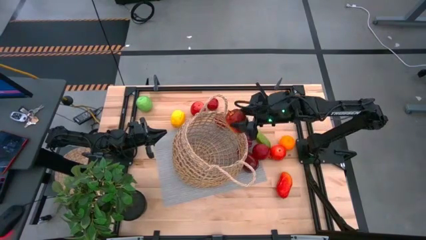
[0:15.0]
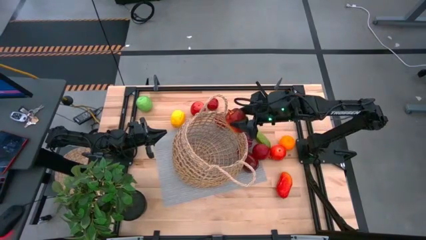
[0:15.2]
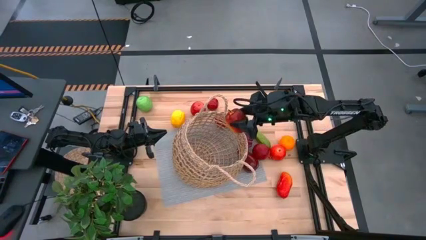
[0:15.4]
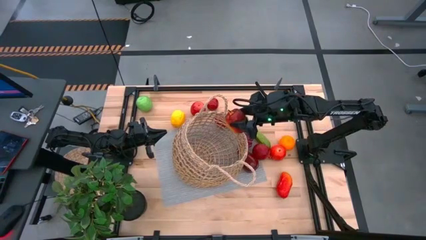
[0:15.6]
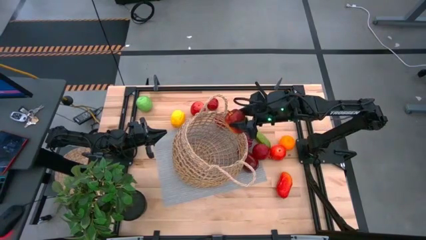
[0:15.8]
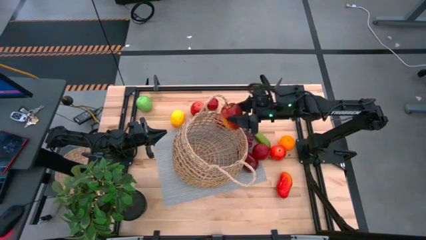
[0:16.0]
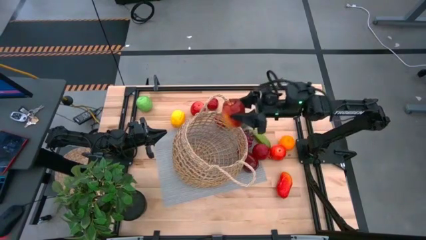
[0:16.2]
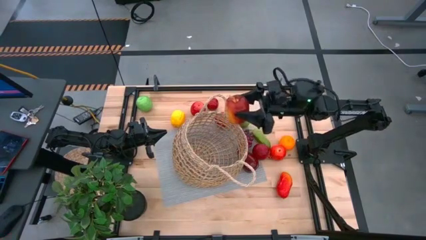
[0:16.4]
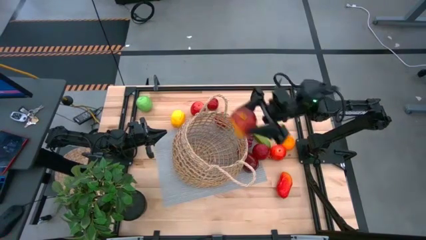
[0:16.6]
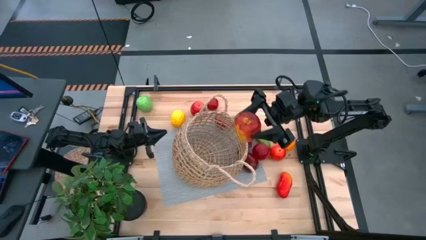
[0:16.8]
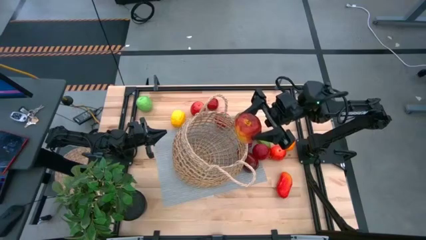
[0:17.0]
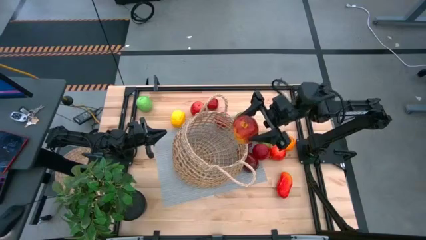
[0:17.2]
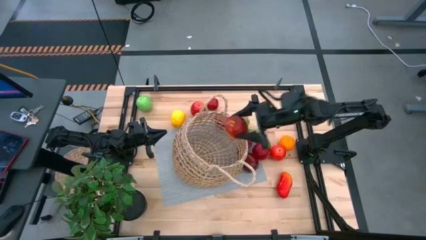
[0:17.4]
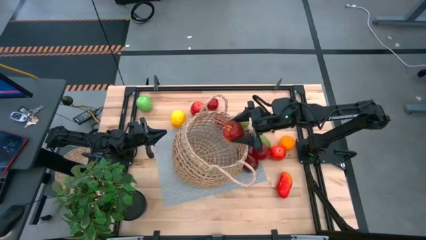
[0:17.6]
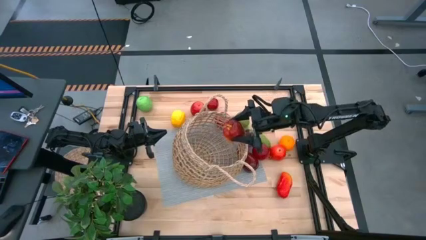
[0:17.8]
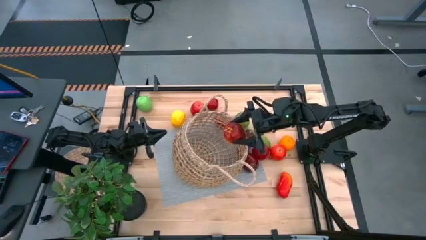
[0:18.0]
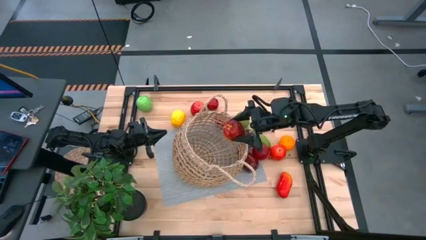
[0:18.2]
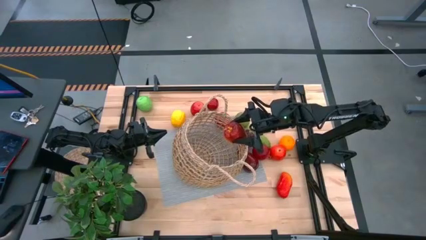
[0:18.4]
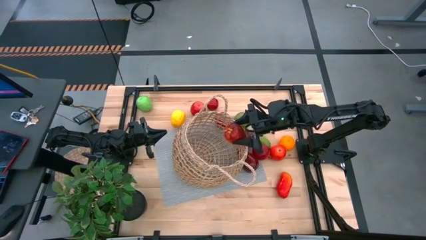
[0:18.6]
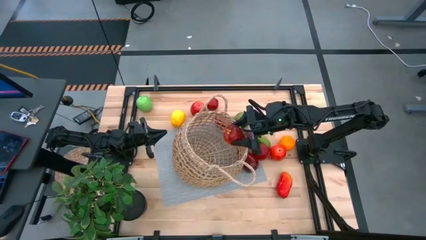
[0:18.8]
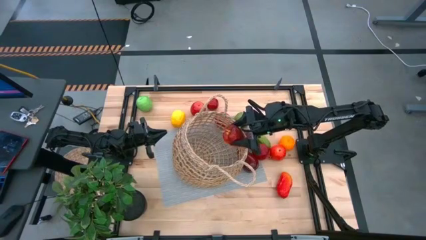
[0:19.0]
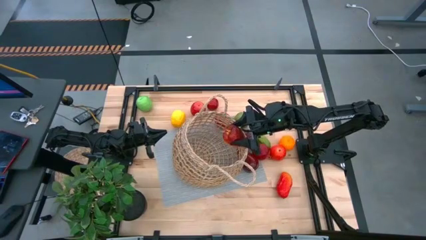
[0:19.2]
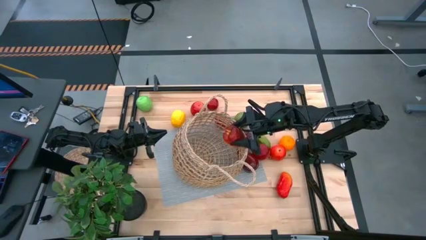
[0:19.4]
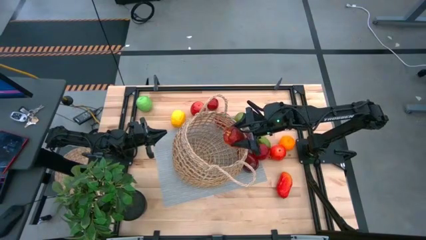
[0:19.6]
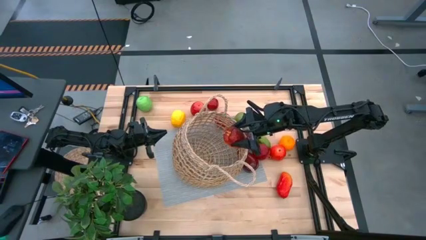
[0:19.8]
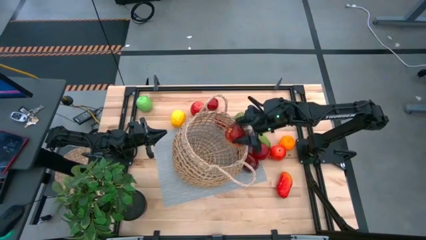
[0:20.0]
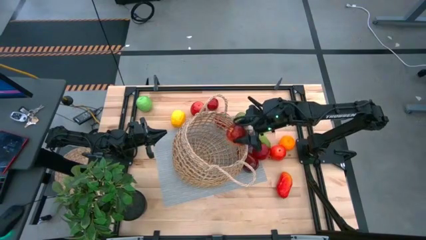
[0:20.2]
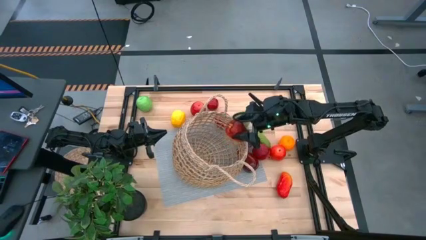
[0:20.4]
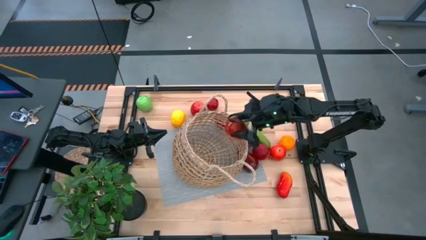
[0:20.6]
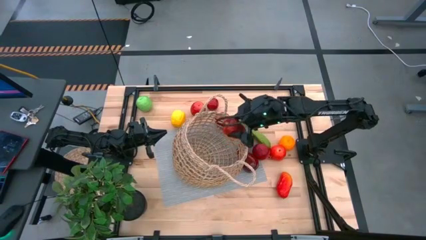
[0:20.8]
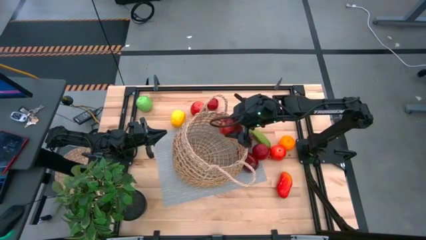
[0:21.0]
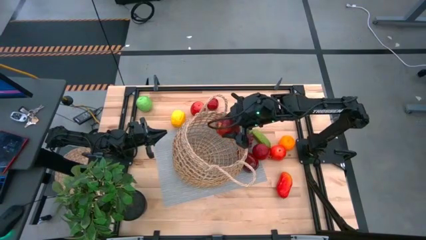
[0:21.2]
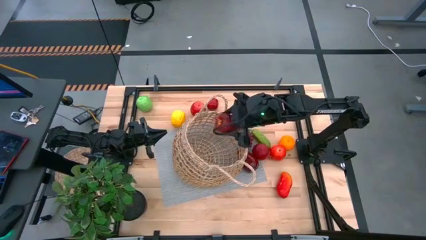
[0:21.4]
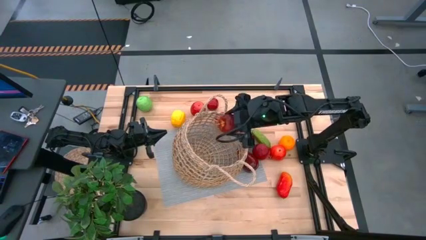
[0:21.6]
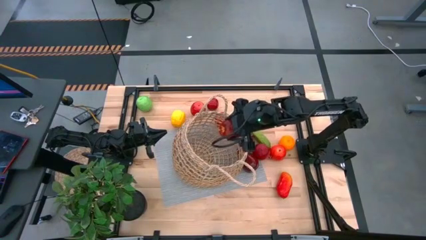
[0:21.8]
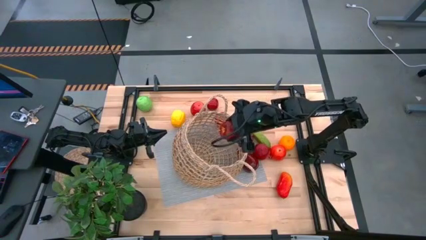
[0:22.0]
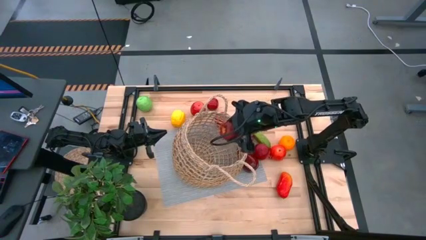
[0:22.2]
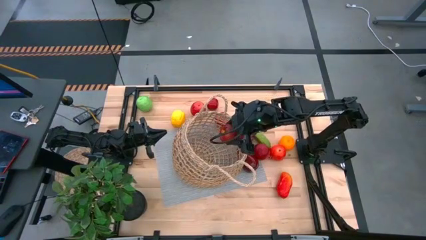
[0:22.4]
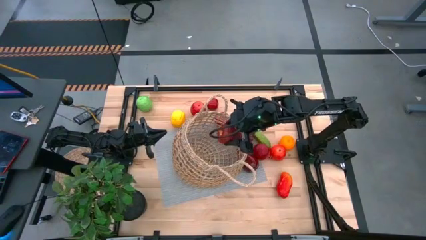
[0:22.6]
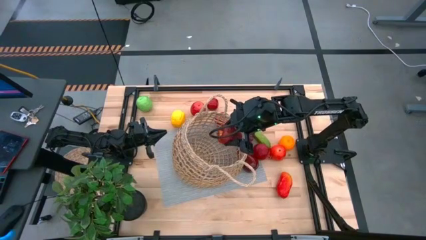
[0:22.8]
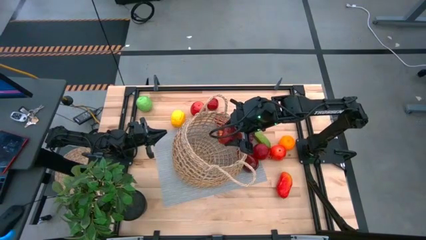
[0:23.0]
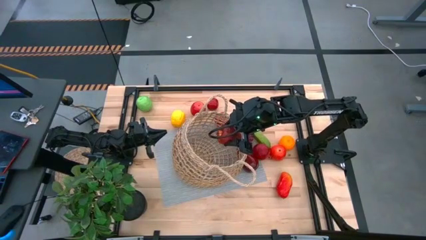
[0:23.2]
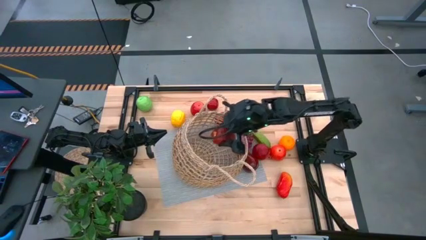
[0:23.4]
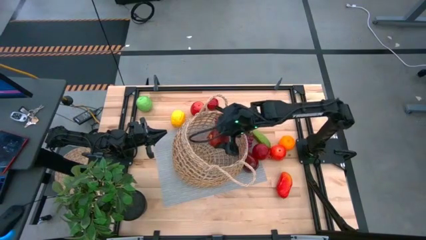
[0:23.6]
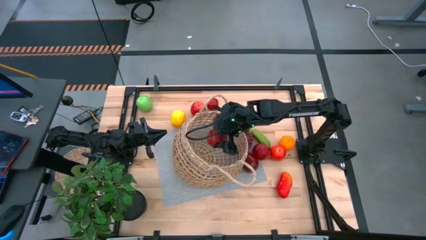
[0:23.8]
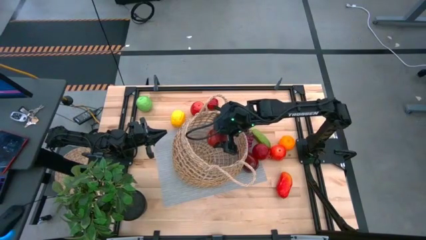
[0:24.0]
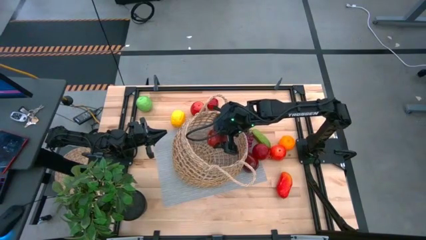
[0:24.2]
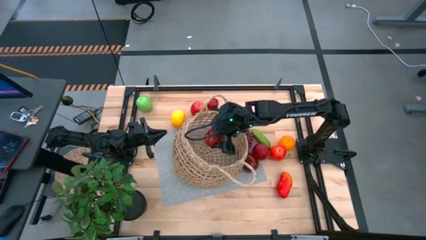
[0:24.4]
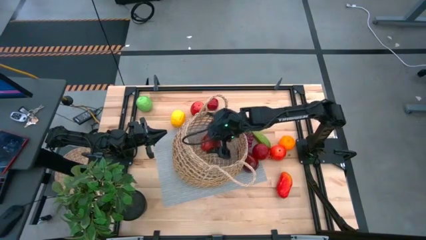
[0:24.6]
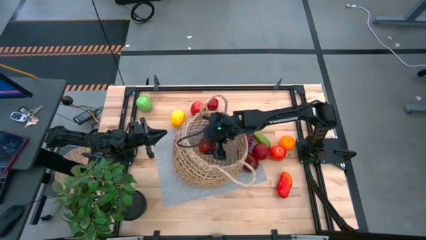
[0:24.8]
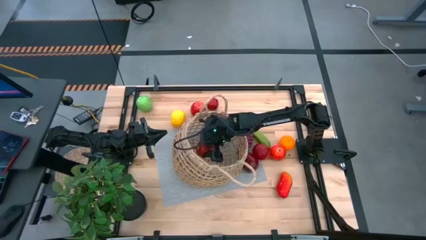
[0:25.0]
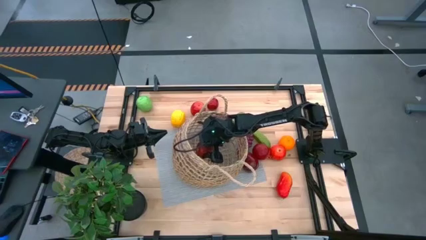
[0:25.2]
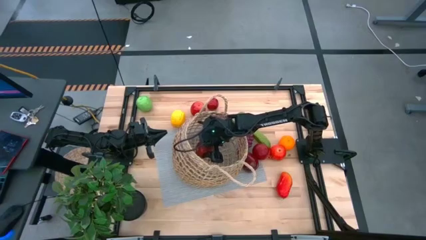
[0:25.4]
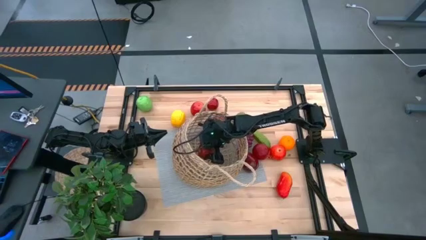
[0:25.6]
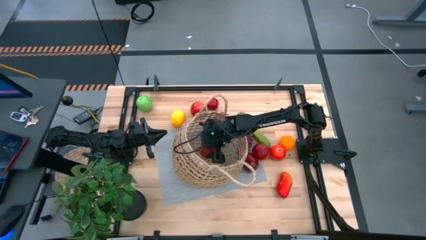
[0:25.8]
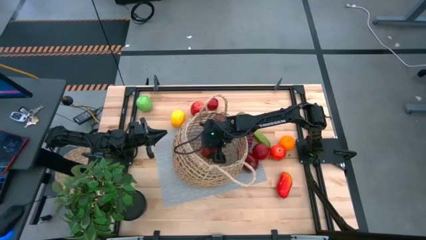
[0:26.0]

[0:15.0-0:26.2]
Task: Build produce basket
Put the red apple into the basket

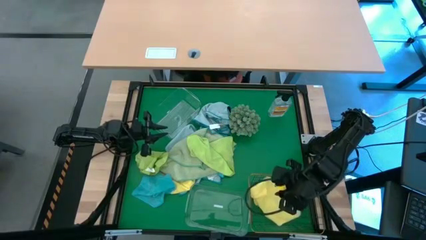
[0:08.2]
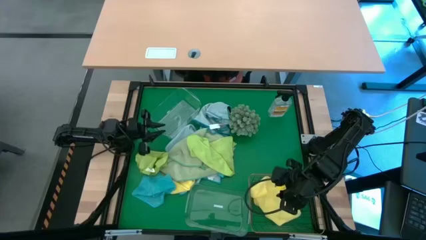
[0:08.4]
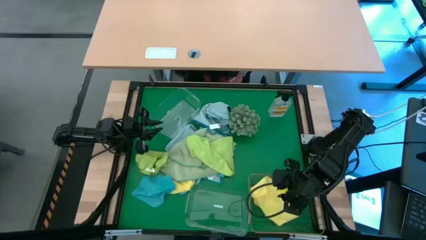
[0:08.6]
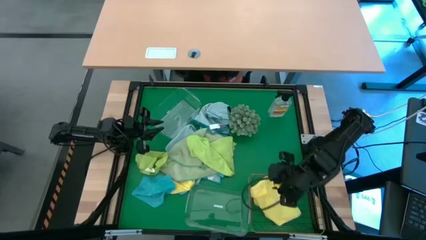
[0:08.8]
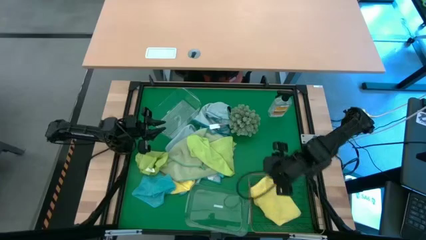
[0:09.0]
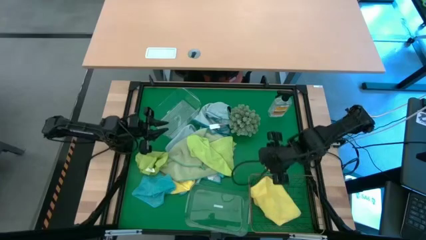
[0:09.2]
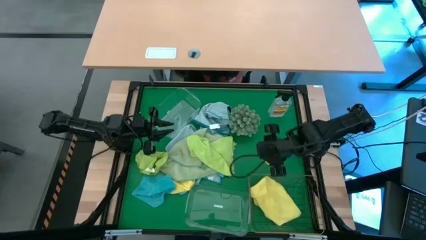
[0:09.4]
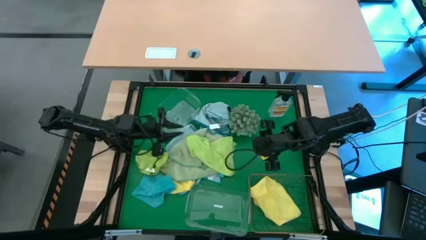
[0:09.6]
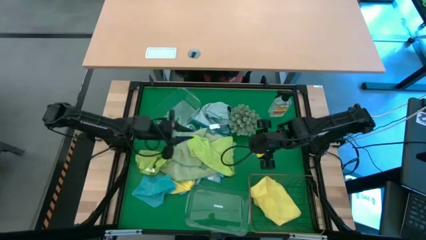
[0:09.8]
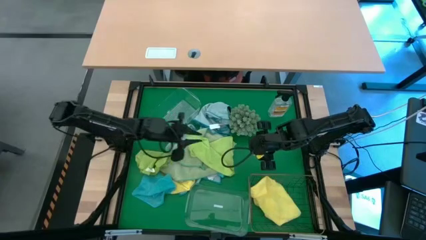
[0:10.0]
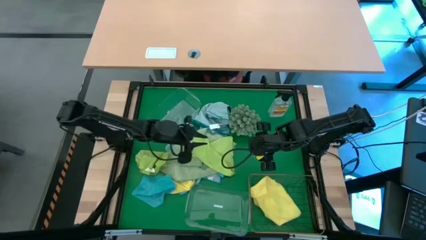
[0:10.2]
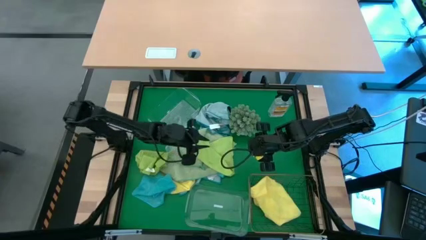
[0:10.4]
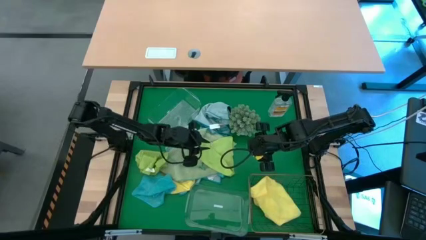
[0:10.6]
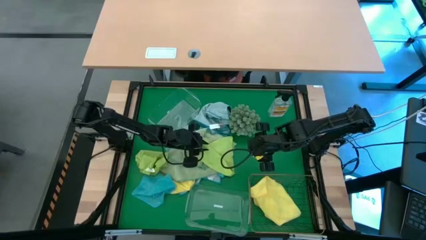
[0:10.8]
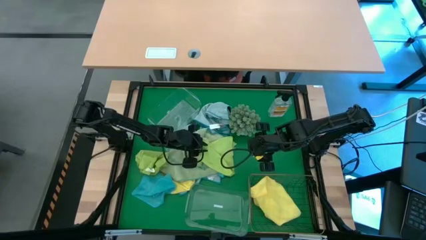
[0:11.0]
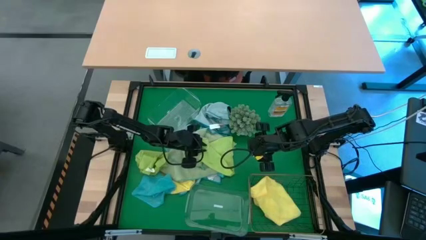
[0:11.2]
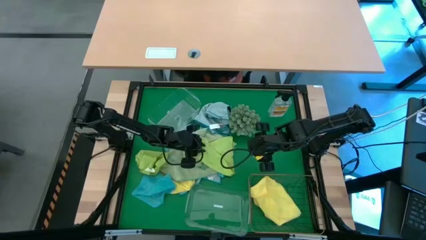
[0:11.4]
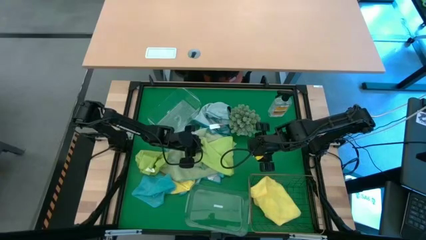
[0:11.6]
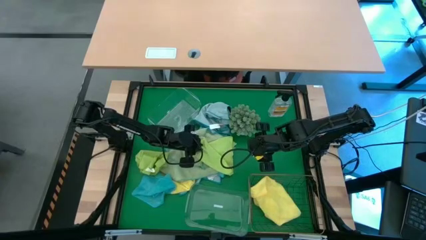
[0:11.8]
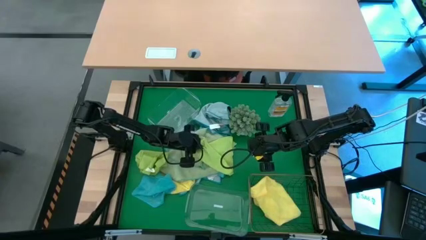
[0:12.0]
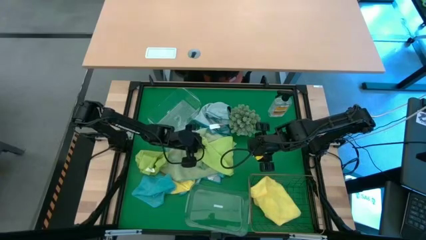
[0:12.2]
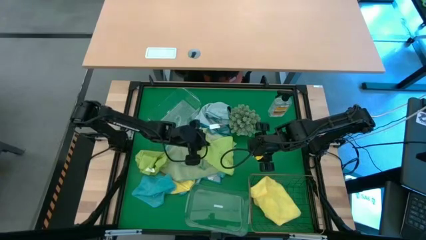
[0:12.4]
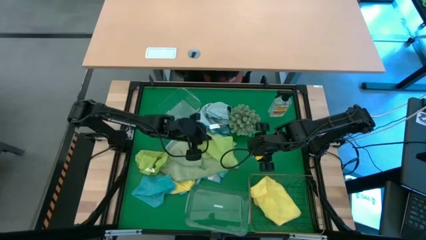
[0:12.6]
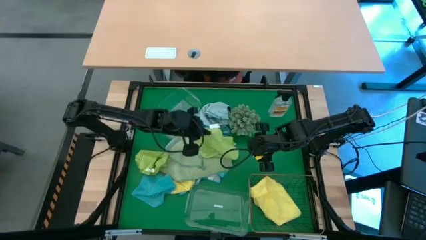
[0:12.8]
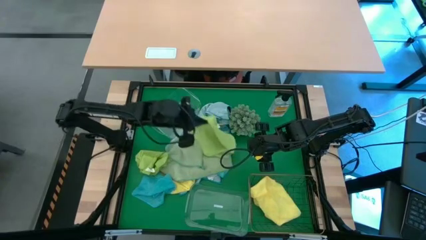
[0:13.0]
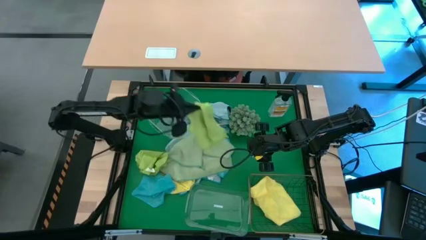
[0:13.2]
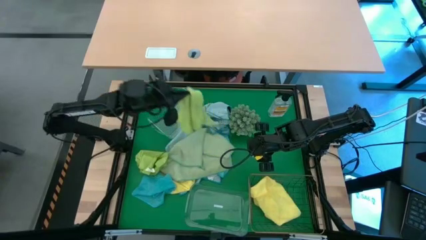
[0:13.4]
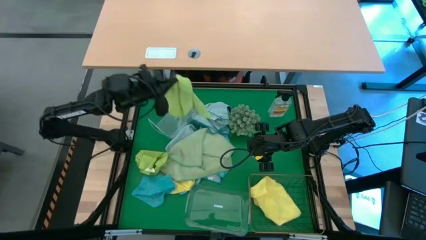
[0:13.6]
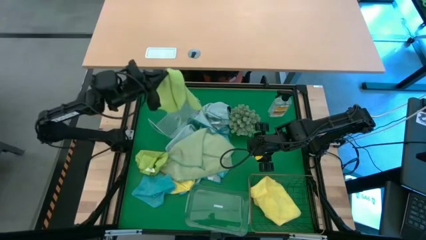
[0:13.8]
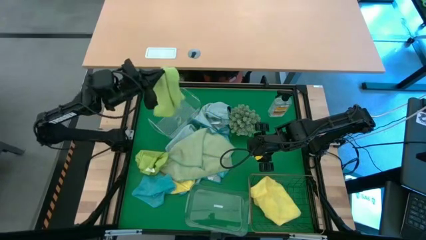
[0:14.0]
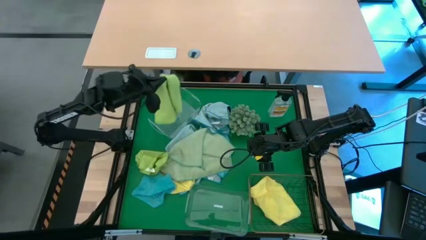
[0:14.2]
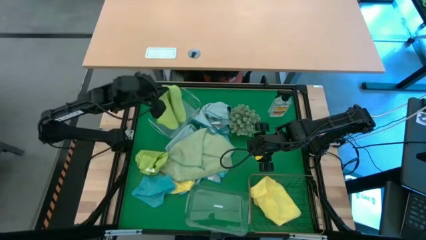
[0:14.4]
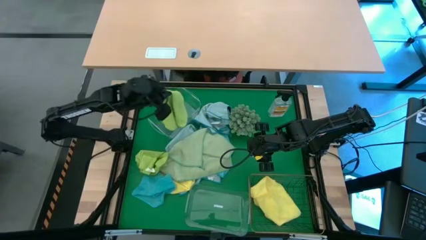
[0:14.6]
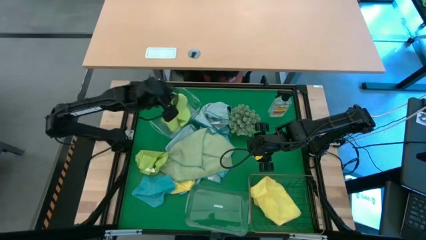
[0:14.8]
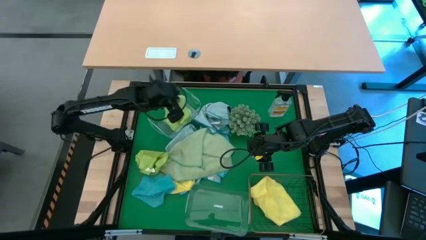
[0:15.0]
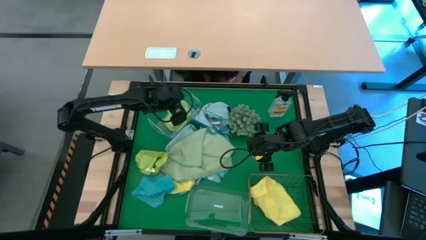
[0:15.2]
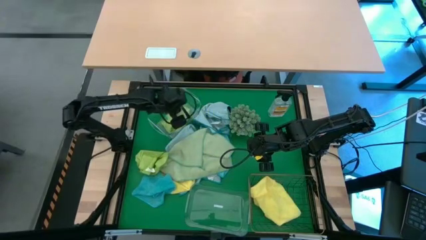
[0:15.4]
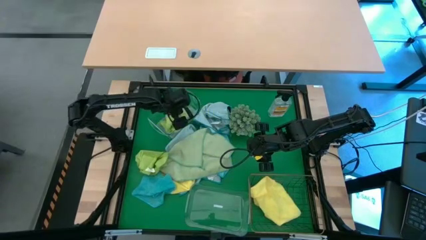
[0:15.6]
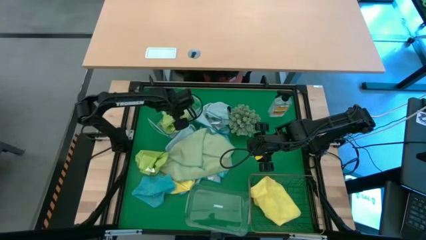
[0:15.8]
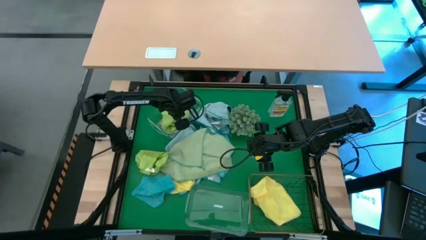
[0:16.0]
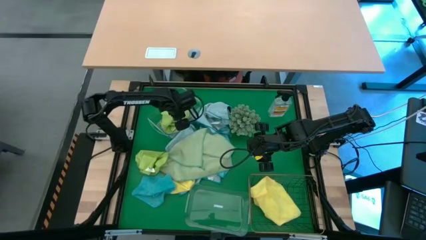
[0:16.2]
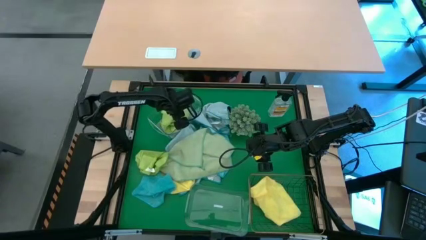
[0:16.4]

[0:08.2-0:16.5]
Task: Sort microfiber towel by color & place in baskets
Put the green microfiber cloth into the top transparent bin
